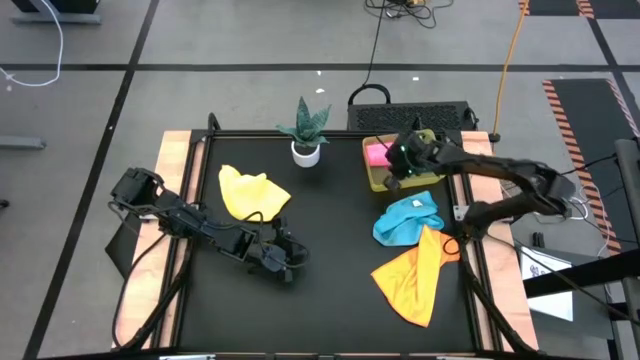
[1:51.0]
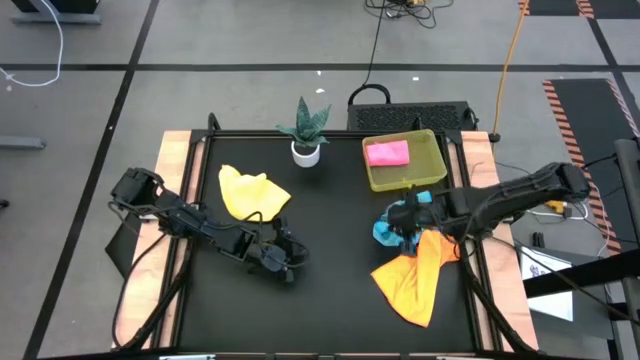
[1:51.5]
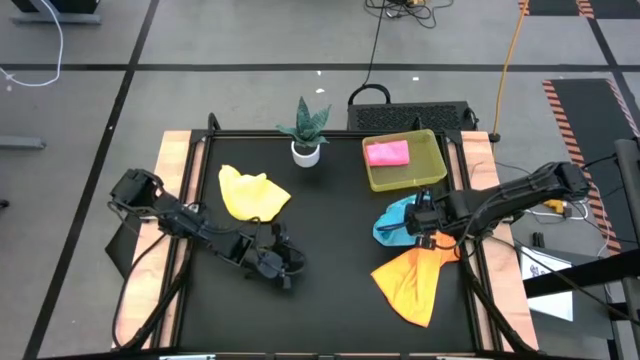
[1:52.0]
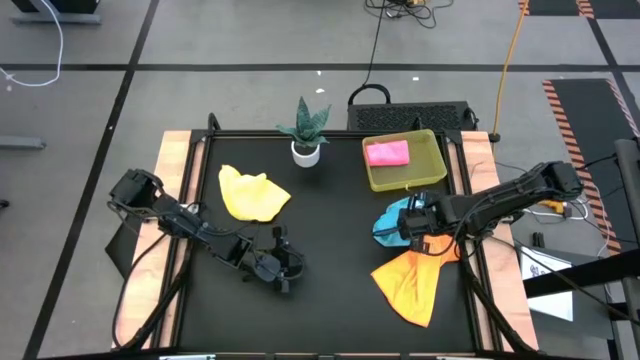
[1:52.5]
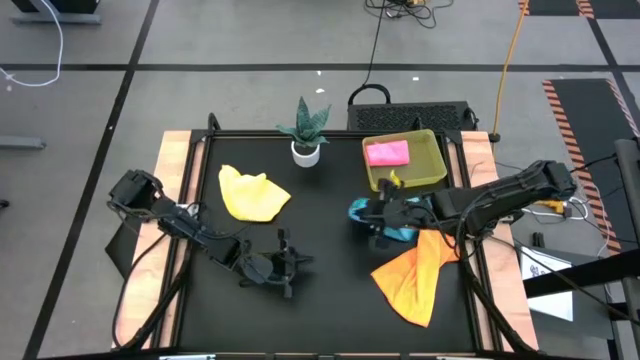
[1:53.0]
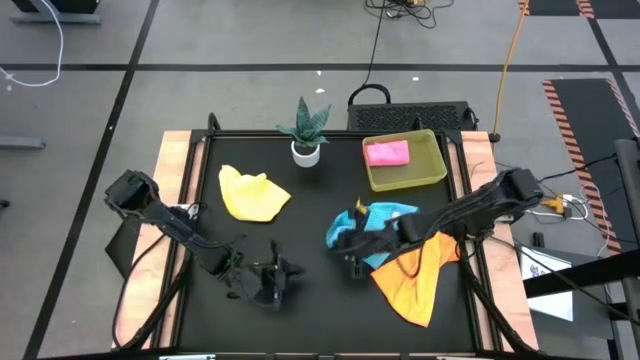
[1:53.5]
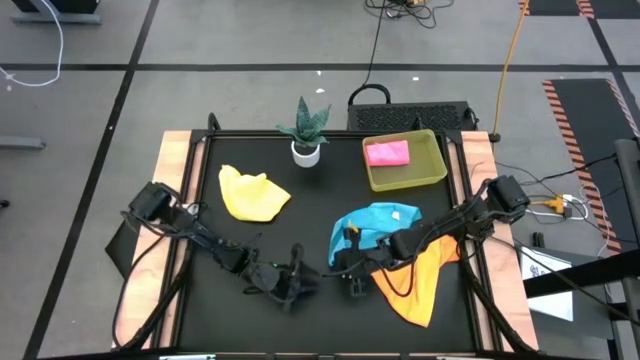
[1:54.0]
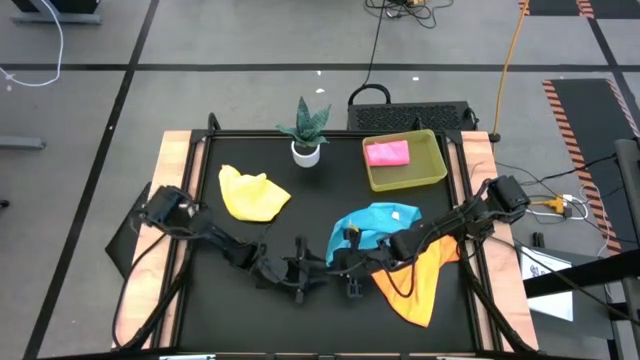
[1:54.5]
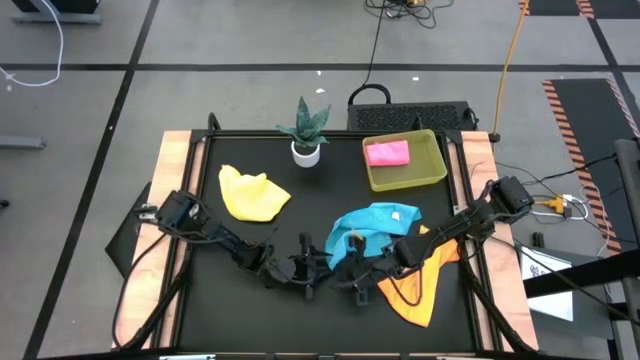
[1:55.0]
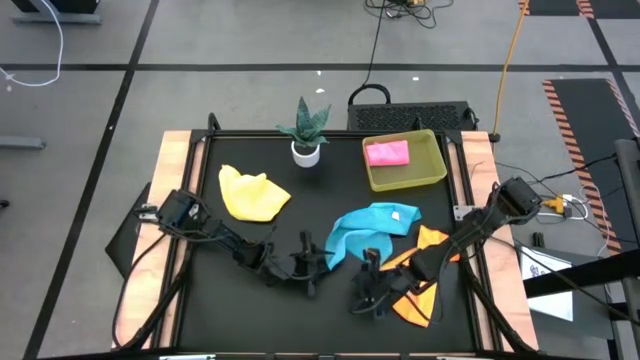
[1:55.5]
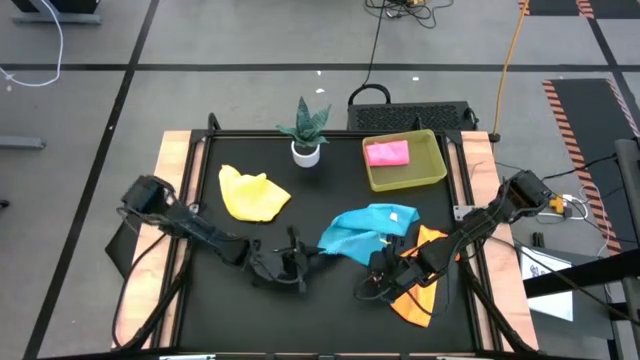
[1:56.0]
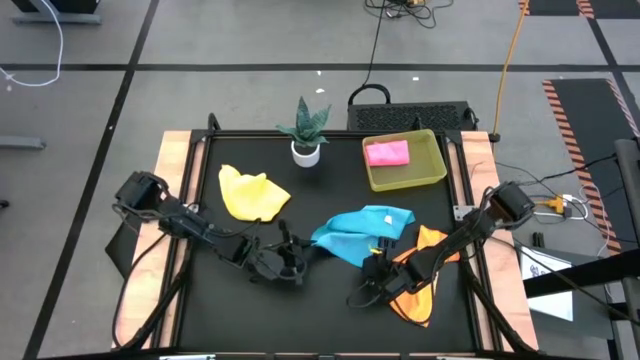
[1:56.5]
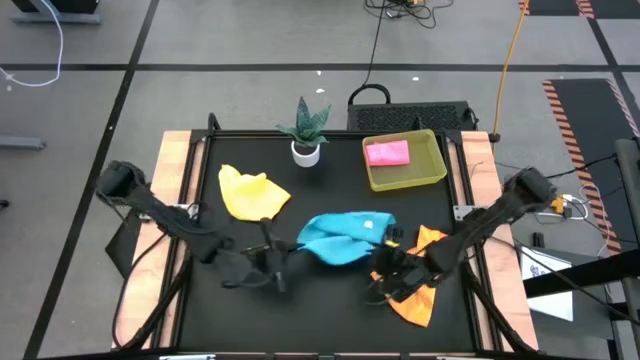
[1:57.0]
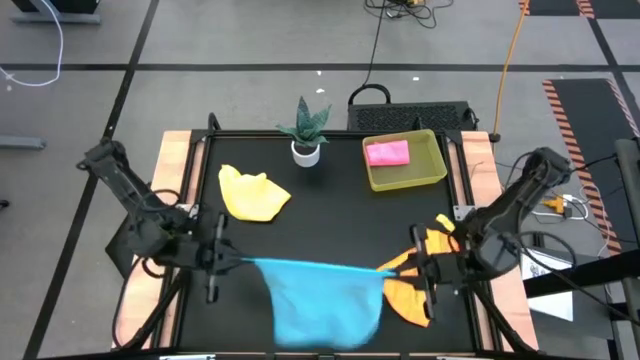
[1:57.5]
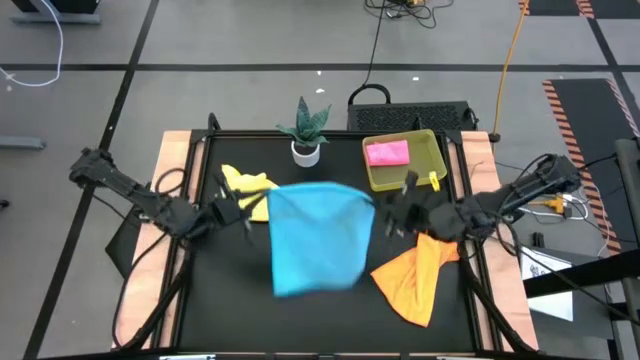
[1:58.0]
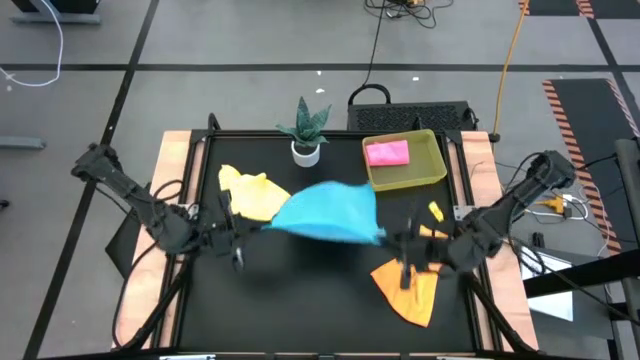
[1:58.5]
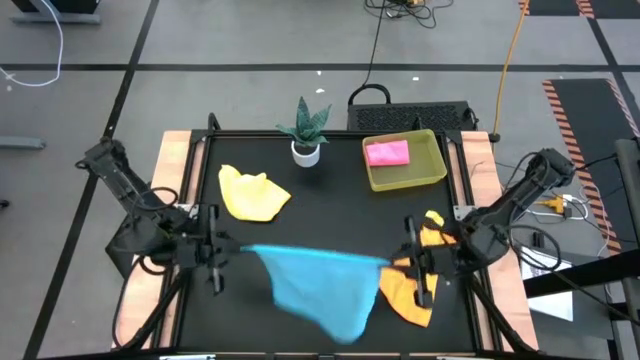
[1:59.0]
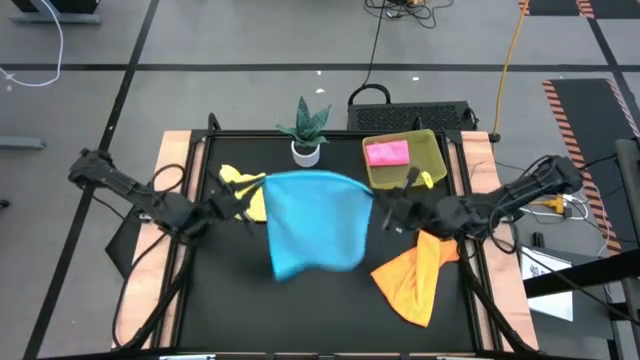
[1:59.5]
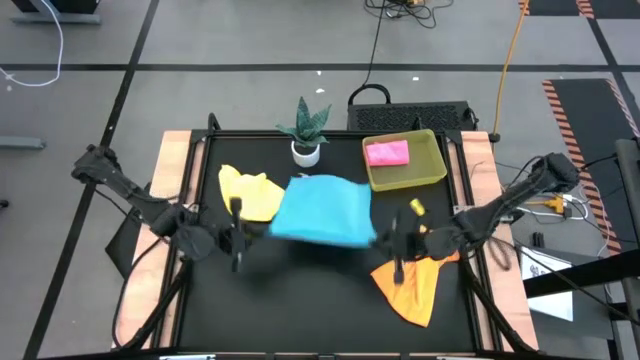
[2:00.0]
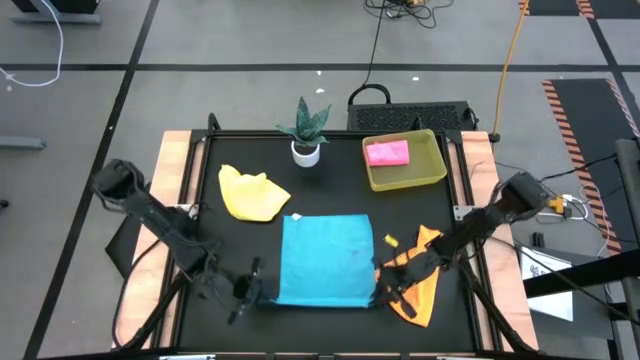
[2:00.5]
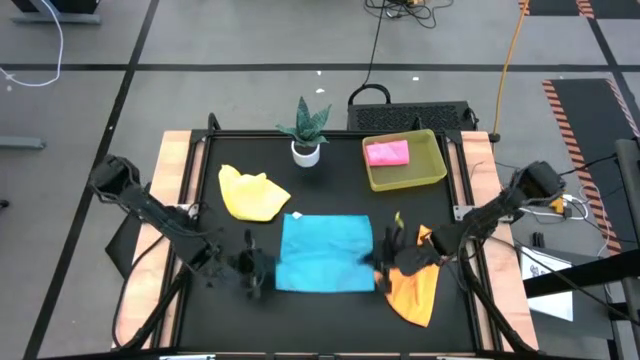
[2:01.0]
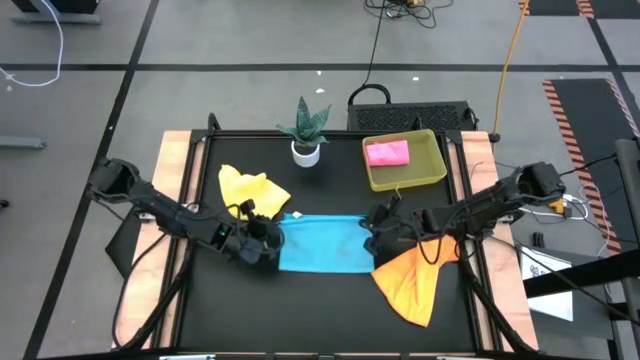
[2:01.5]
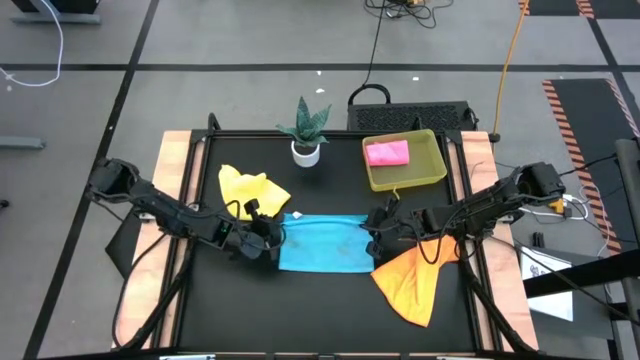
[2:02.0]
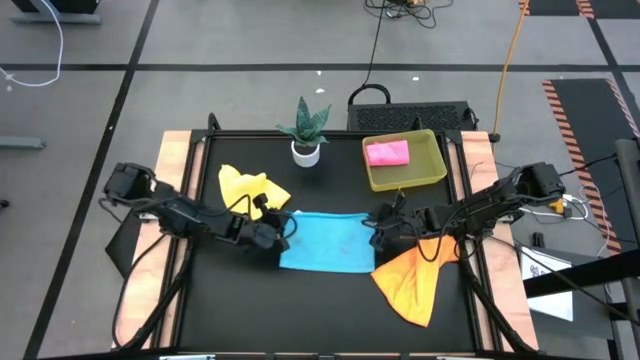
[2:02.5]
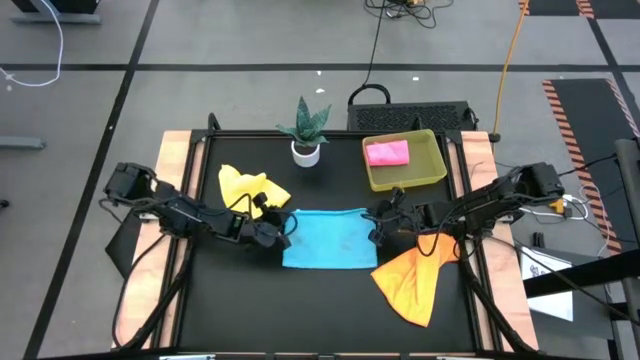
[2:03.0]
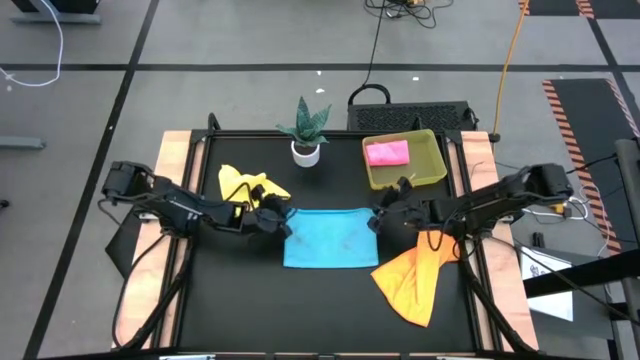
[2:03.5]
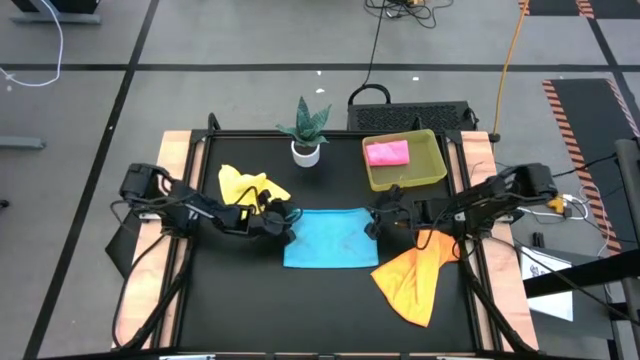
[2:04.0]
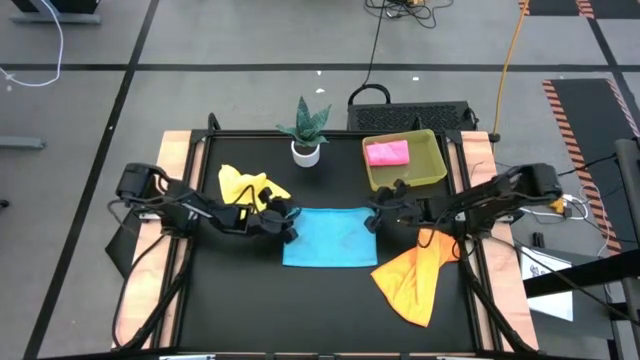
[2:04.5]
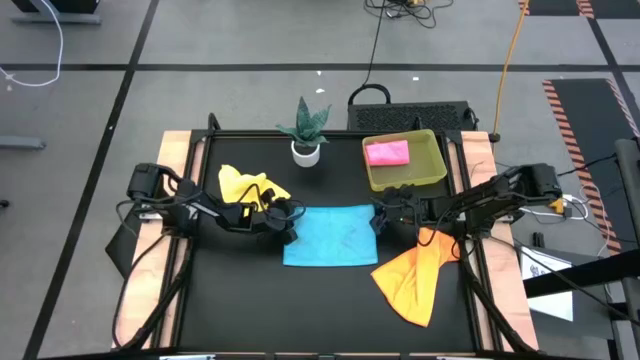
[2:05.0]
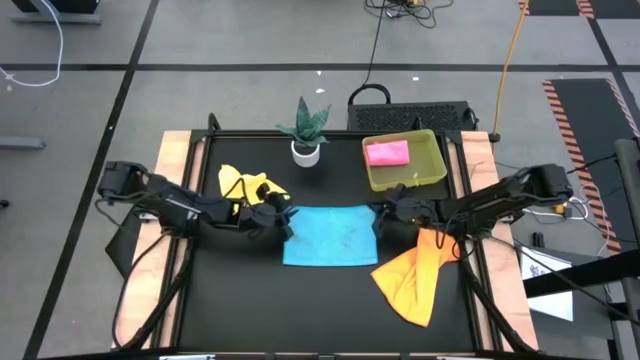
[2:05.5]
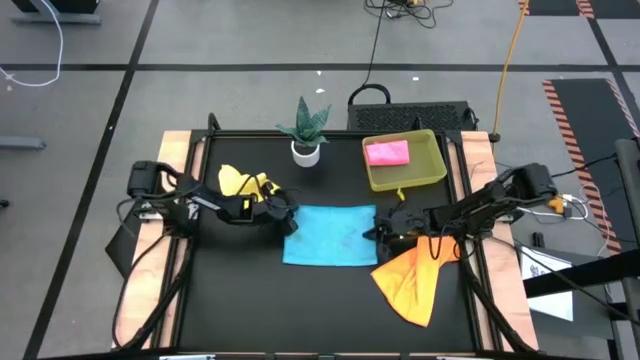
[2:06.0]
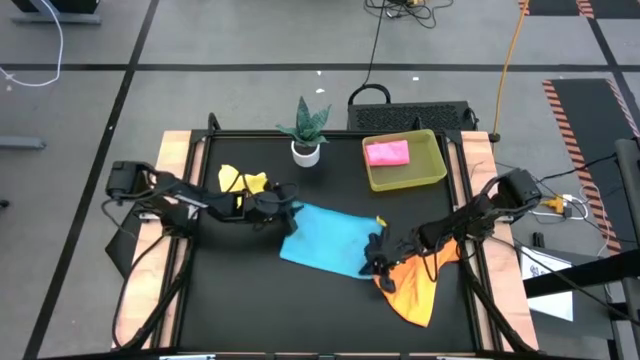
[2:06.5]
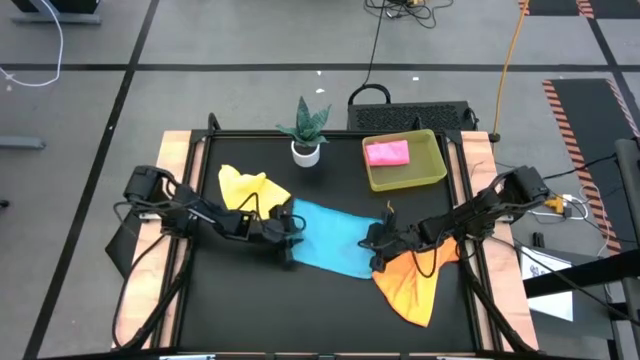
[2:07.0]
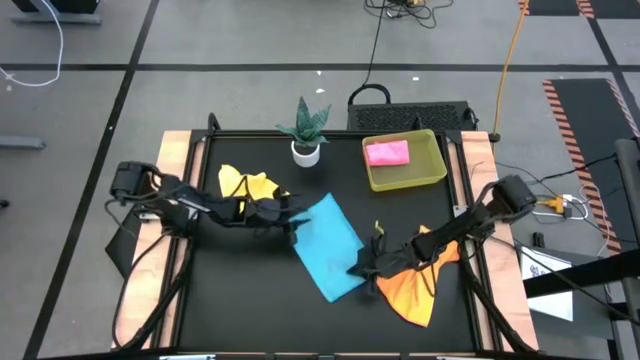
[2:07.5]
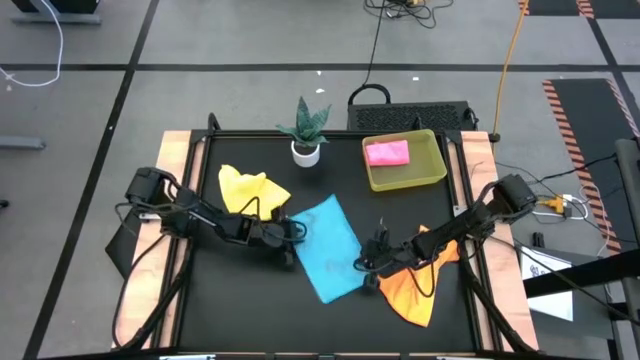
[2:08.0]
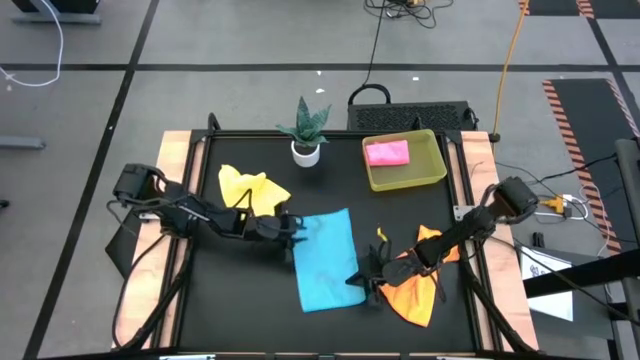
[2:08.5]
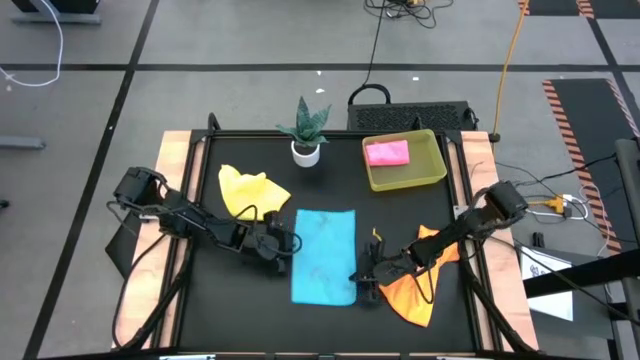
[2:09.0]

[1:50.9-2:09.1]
Task: Fold microfiber towels
Fold the blue microfiber cloth

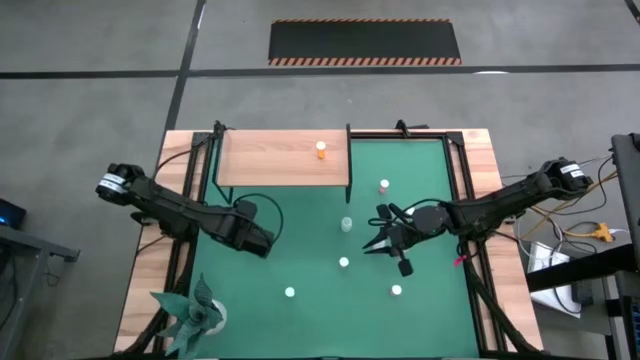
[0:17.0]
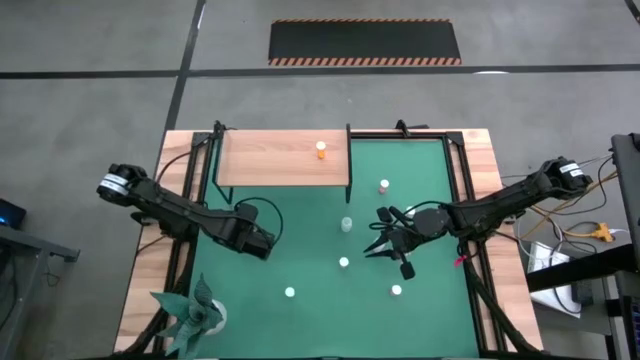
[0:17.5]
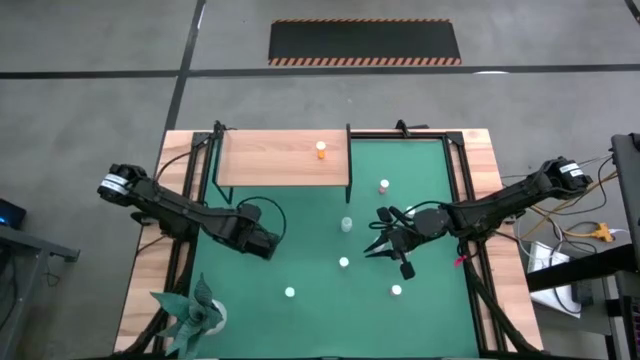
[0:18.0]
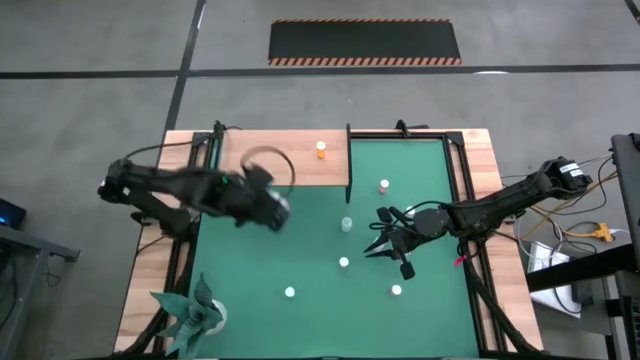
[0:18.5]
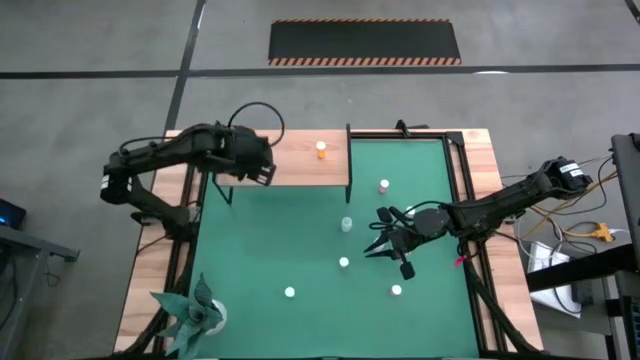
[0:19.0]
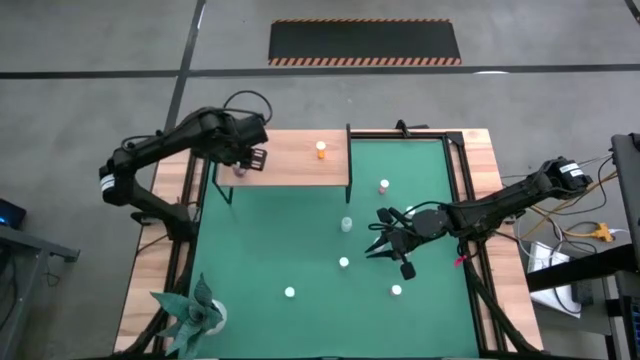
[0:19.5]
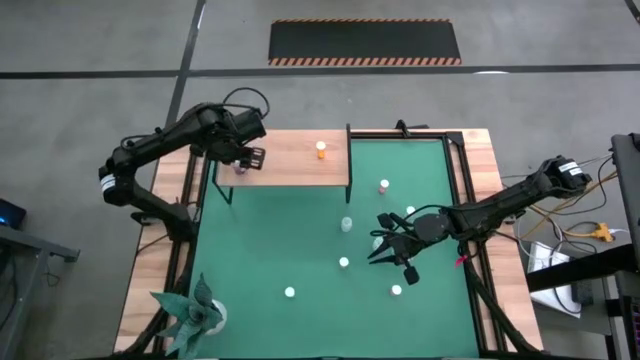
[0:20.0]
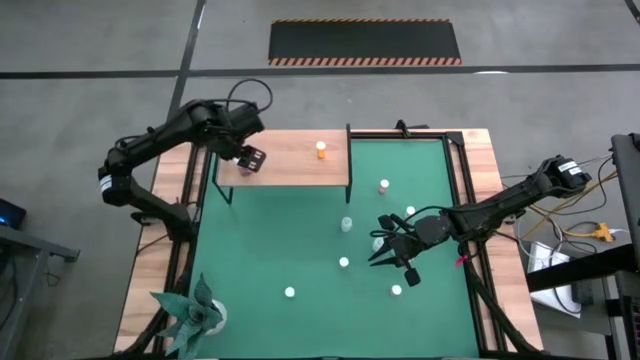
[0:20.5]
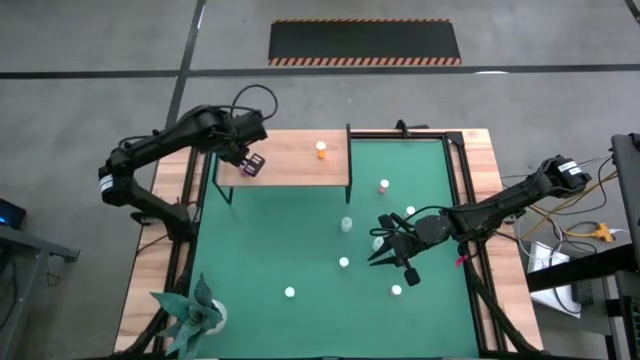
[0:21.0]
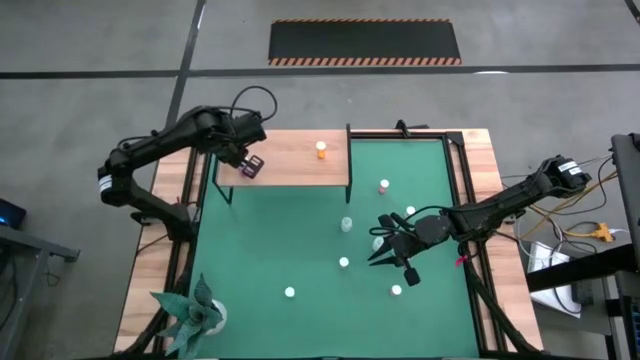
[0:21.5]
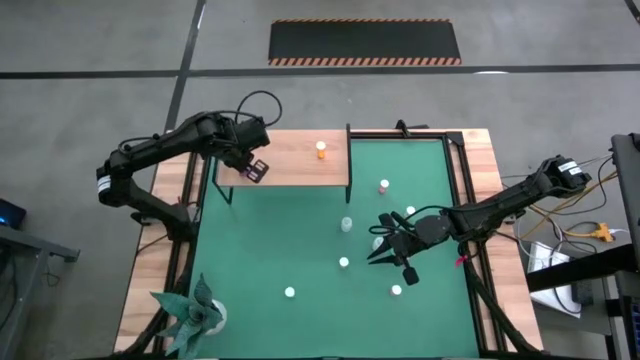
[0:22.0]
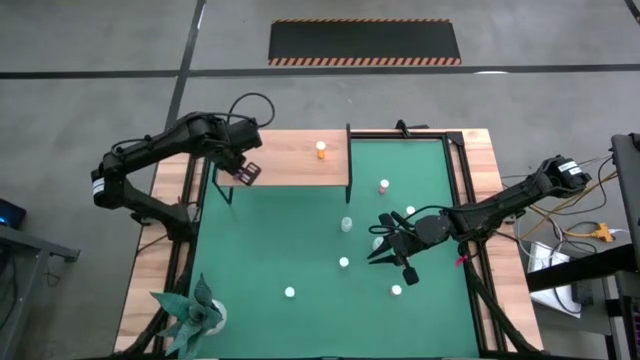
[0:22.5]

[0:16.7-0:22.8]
Task: Pick and place medicine bottles onto shelf by color
Put the big pink pill bottle on the shelf
